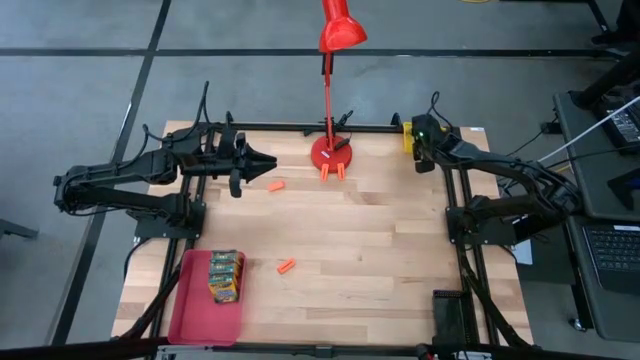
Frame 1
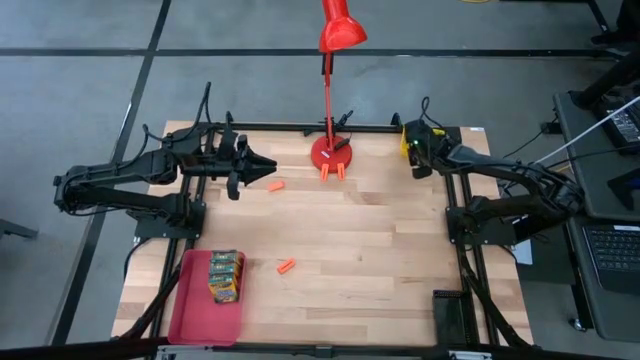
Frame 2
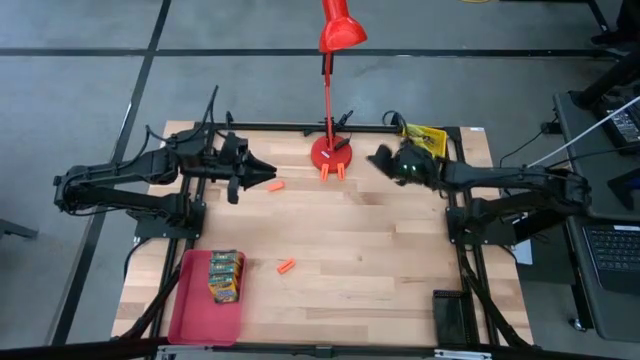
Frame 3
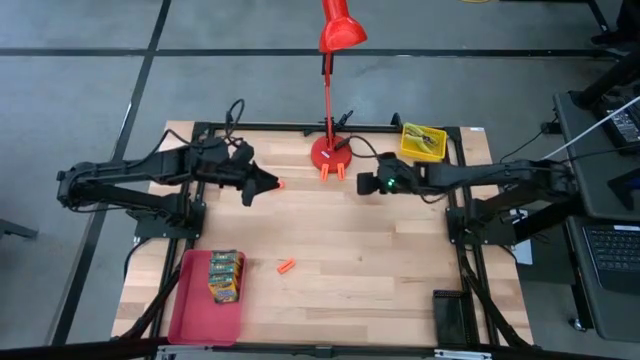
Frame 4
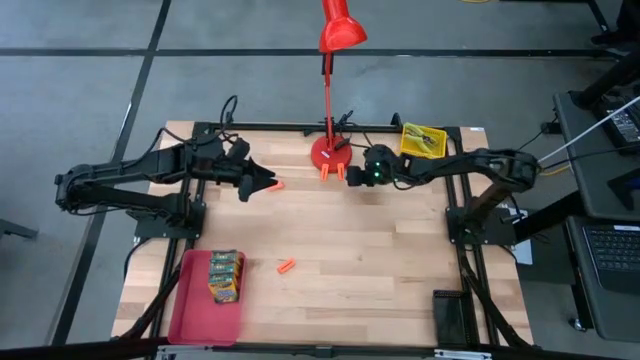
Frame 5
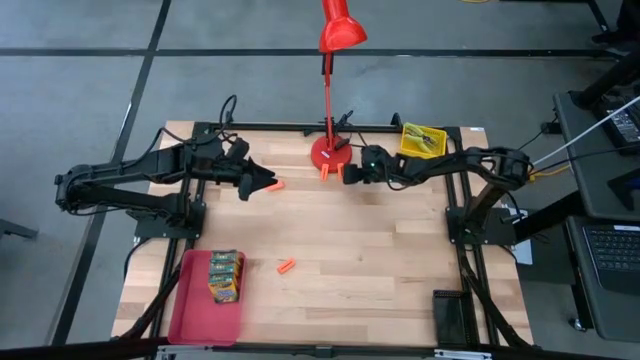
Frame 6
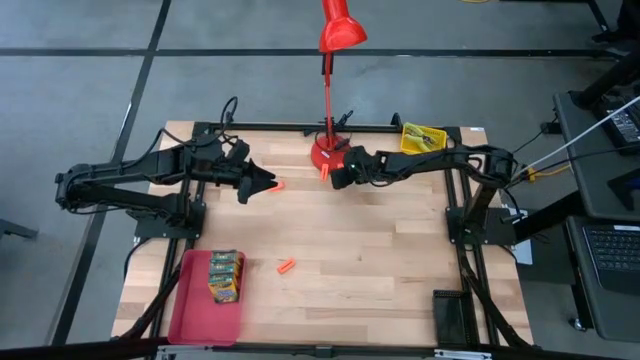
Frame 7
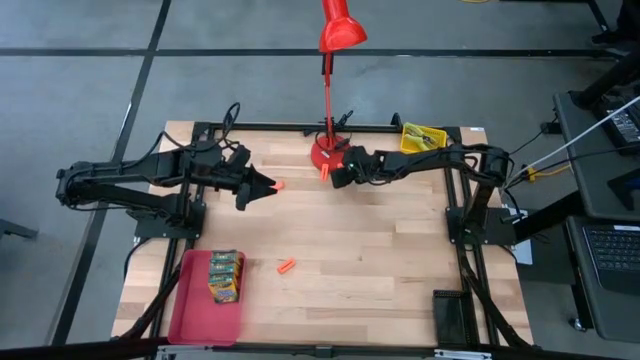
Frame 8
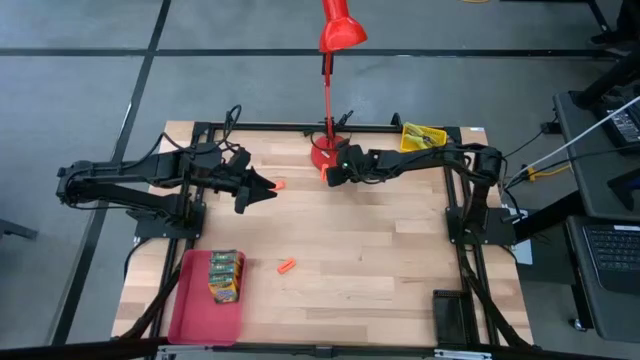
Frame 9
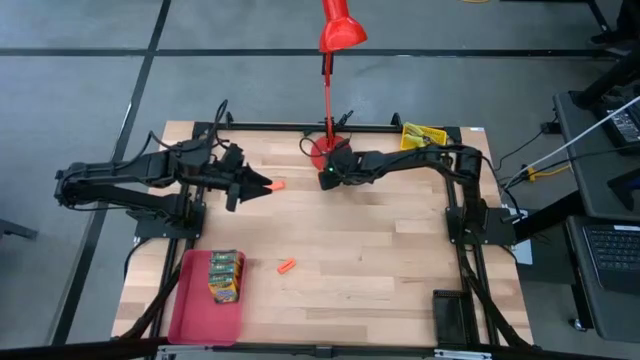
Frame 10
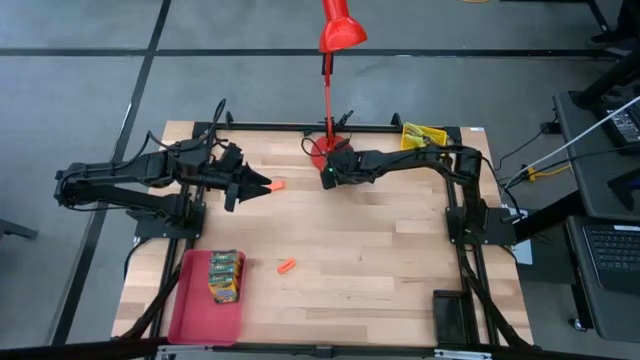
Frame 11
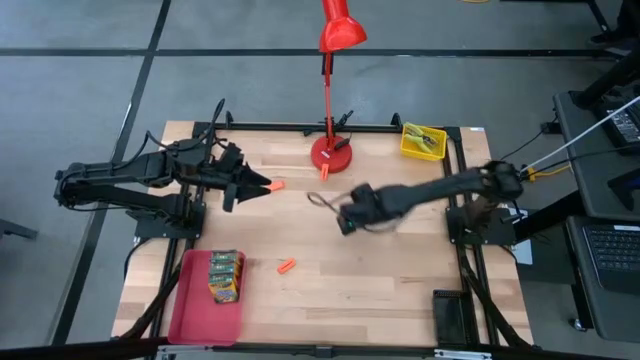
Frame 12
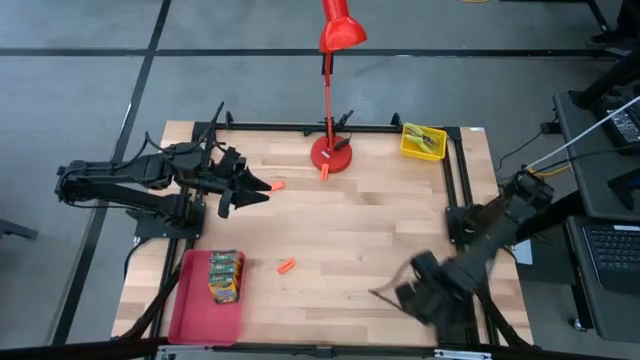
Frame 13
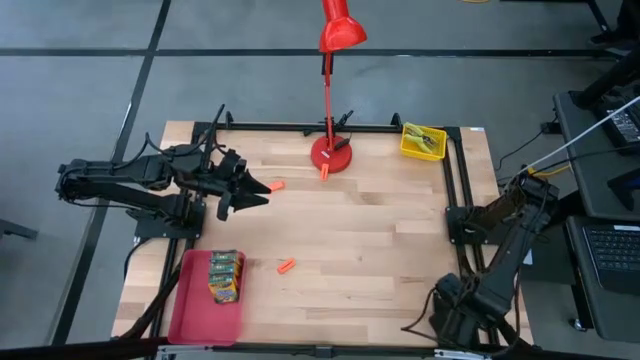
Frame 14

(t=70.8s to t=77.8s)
Task: Pick & Place School Supplies
Put the orange eraser into the black bin

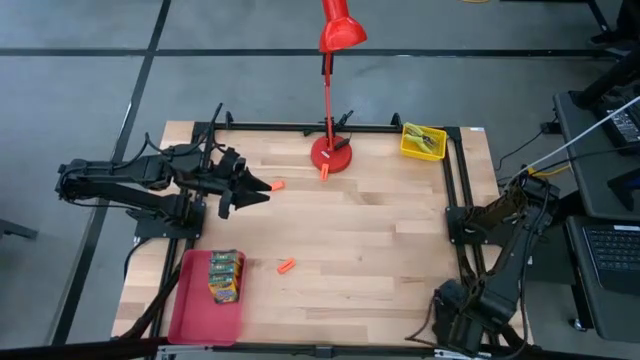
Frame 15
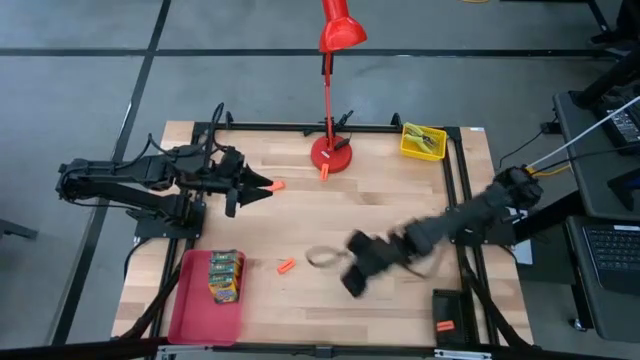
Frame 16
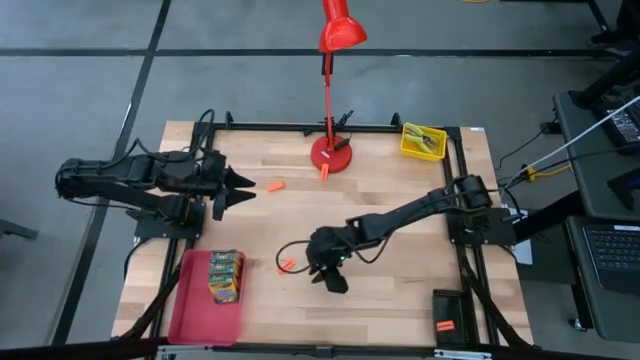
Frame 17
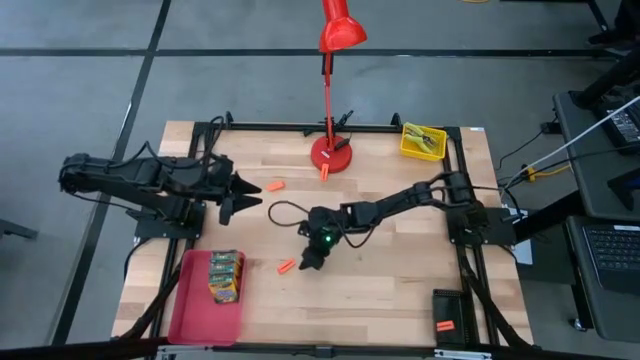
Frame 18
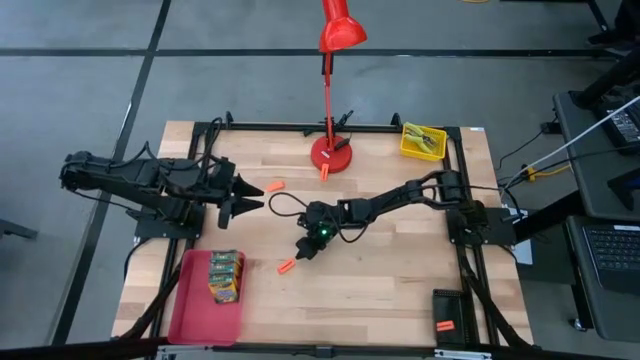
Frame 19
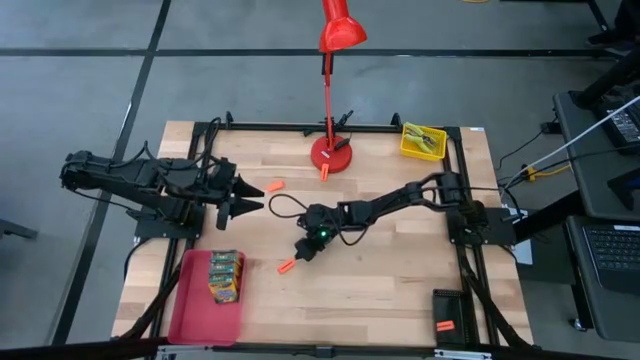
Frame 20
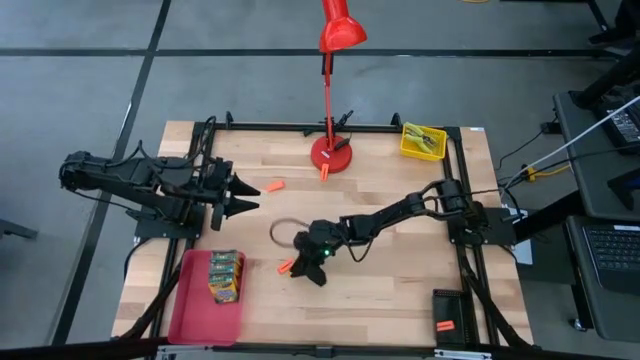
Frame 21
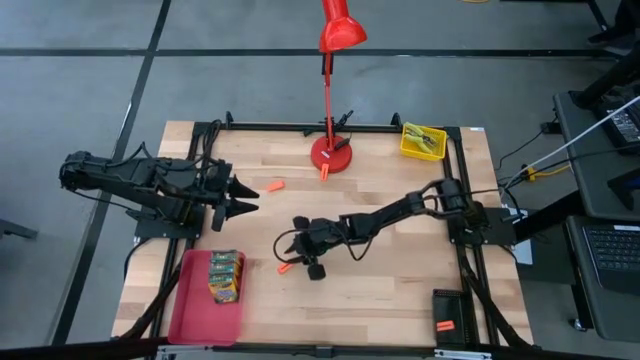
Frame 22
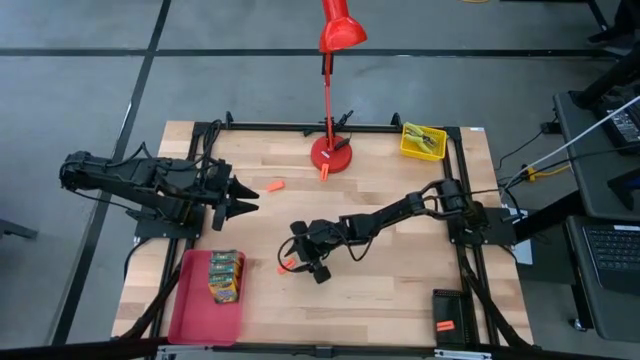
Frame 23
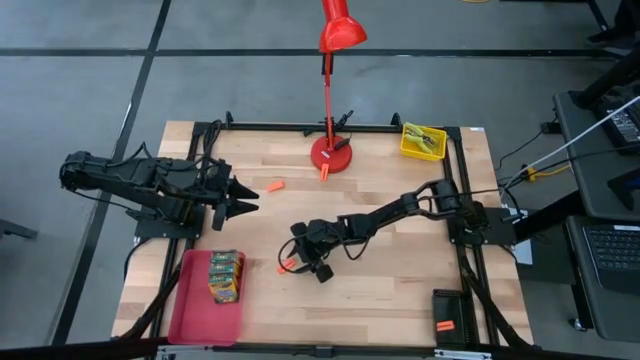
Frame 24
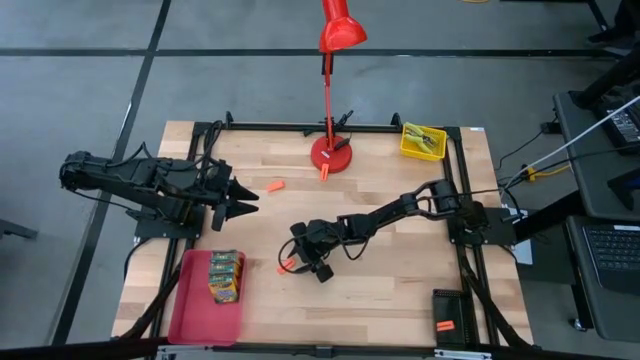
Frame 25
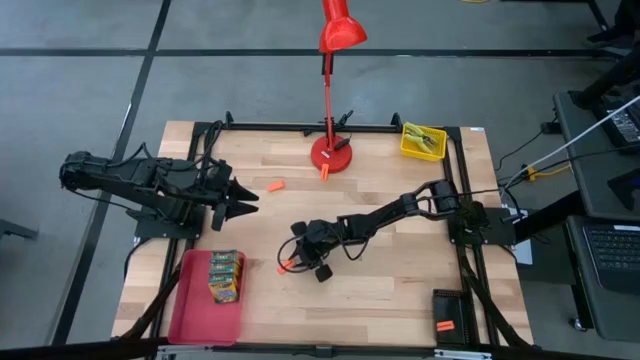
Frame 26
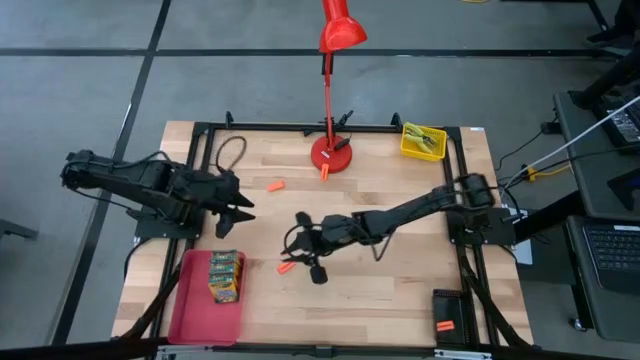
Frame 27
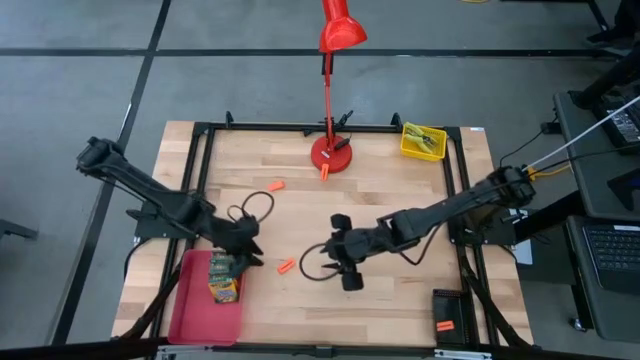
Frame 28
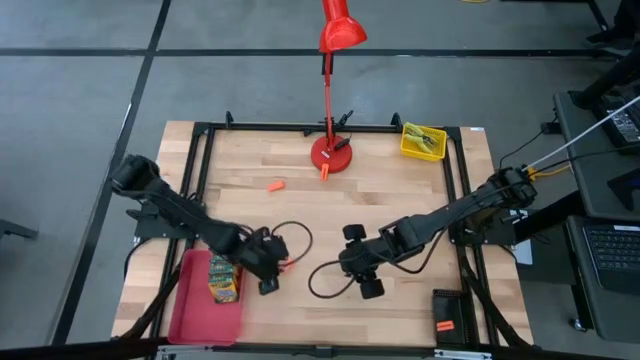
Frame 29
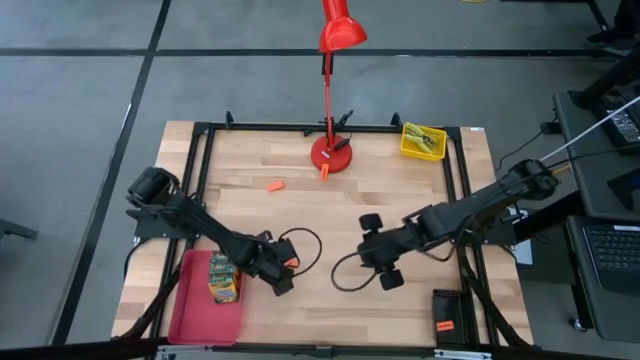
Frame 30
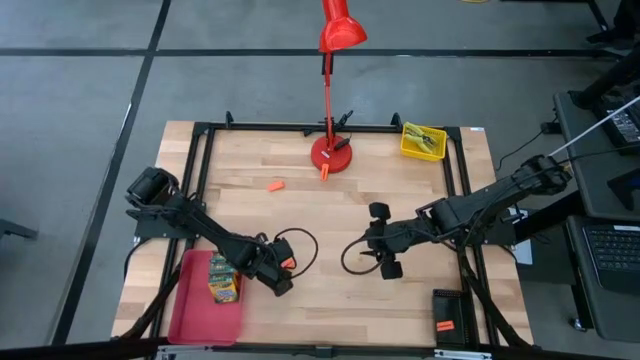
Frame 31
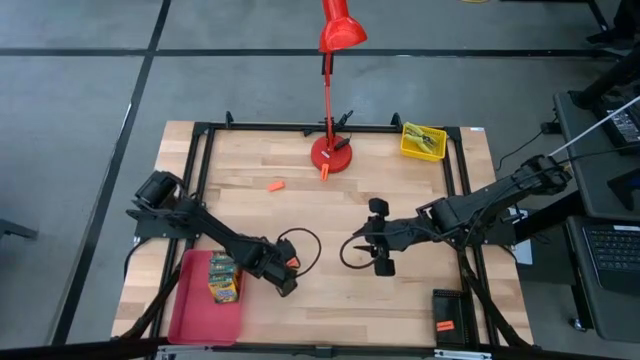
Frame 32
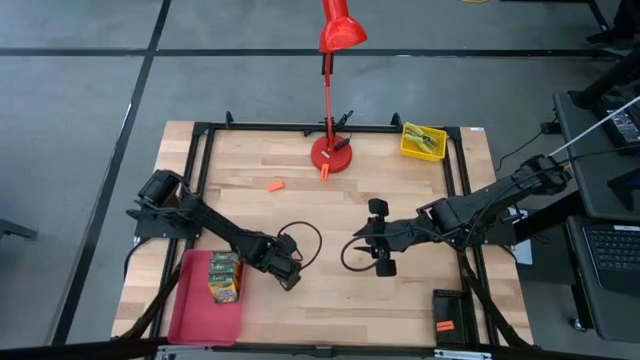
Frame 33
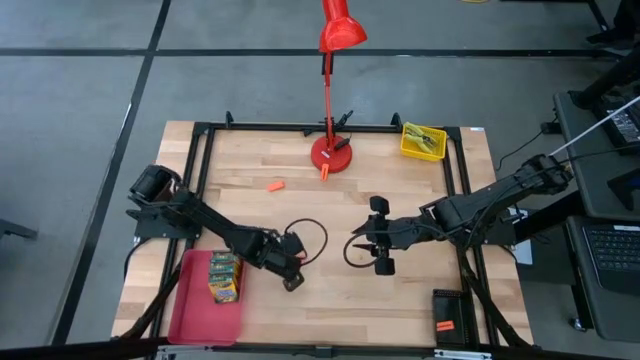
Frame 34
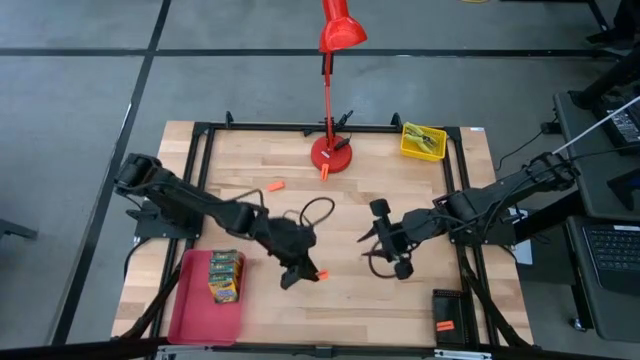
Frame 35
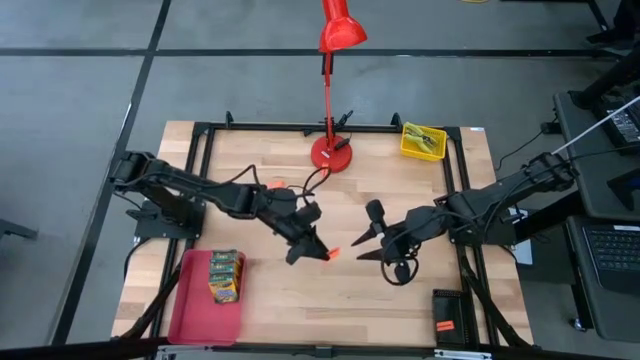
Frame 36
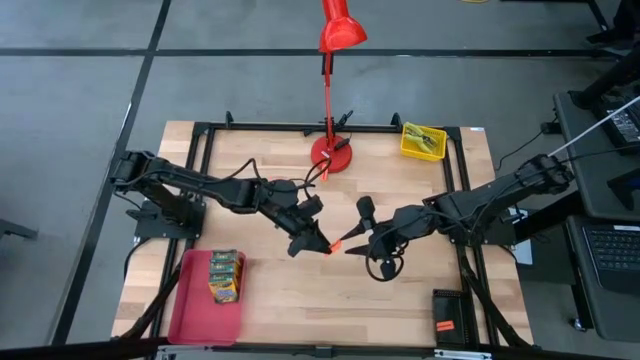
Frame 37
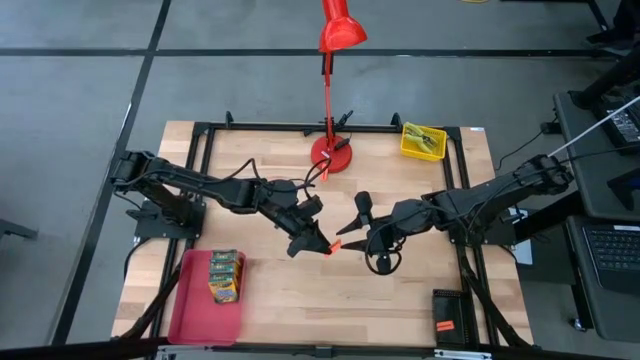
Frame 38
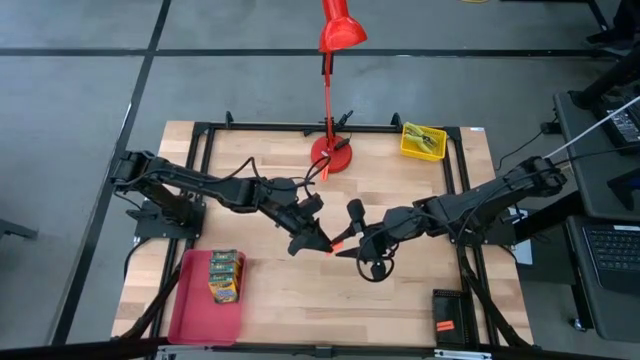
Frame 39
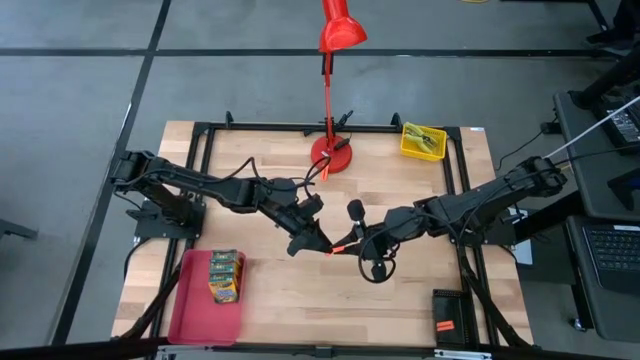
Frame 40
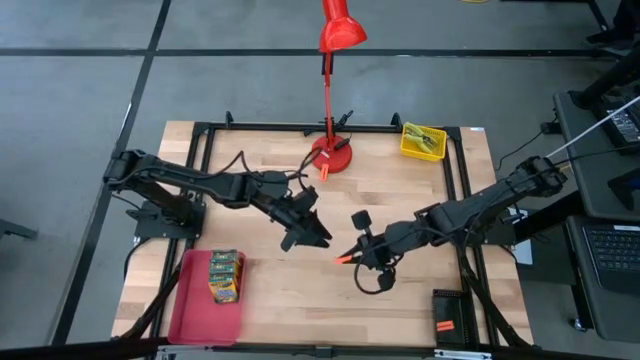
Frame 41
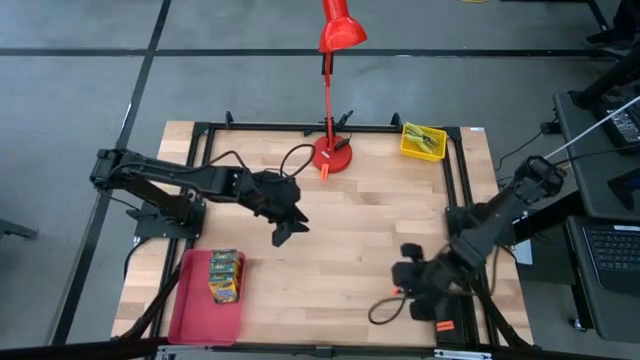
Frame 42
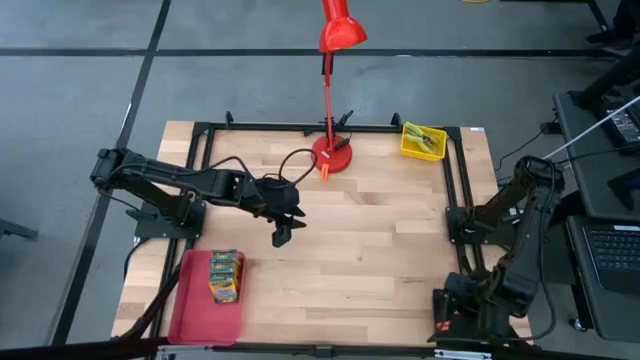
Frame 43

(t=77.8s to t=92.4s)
Put the orange eraser into the black bin
